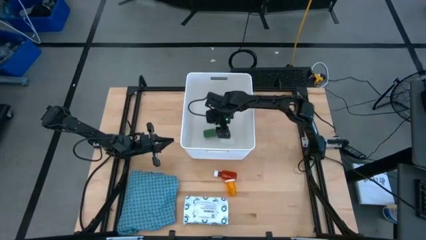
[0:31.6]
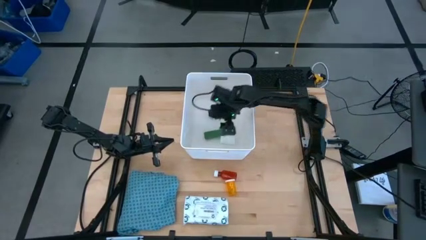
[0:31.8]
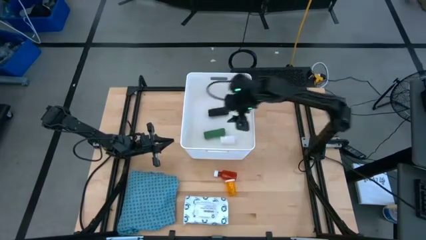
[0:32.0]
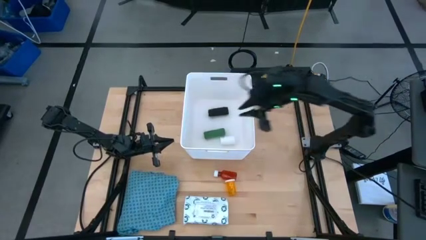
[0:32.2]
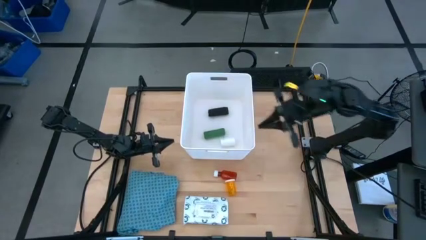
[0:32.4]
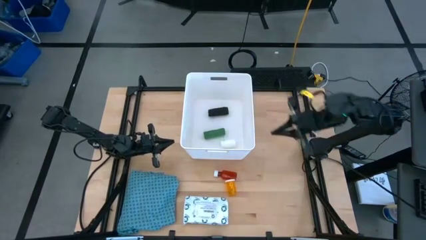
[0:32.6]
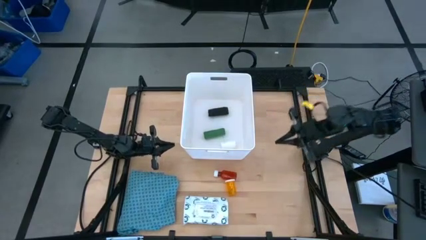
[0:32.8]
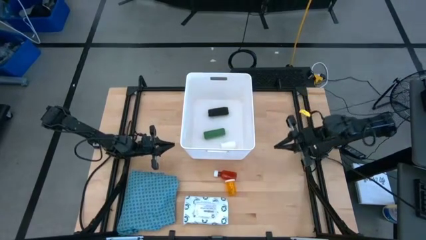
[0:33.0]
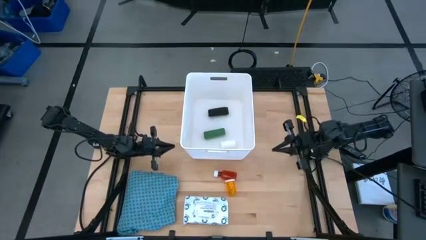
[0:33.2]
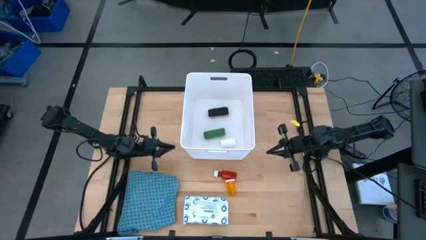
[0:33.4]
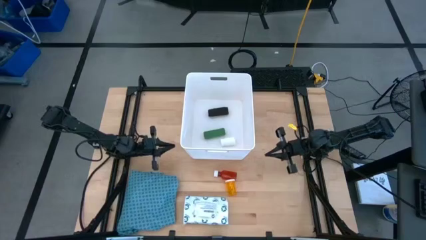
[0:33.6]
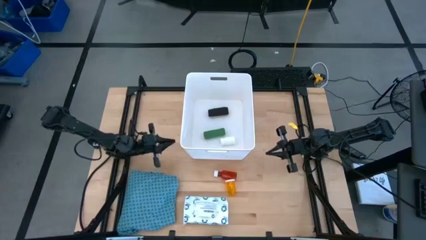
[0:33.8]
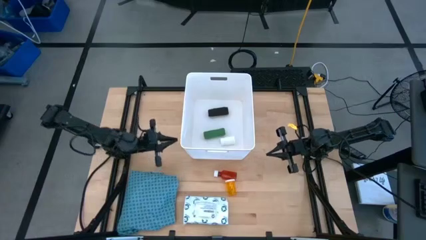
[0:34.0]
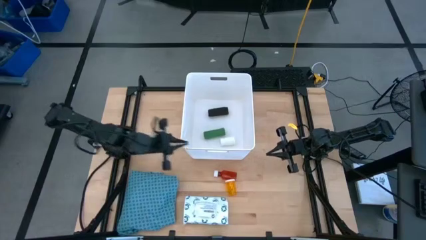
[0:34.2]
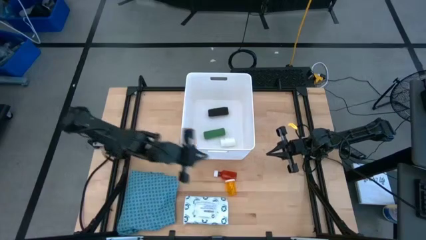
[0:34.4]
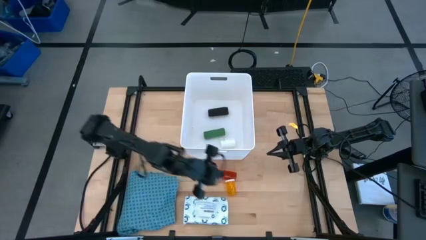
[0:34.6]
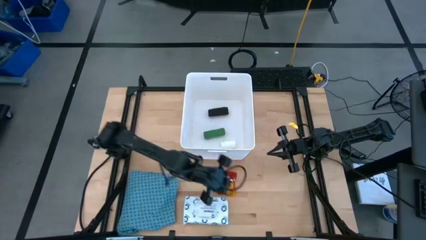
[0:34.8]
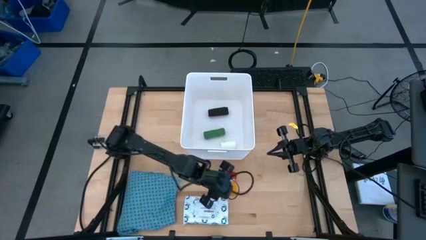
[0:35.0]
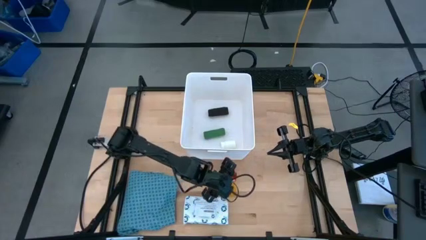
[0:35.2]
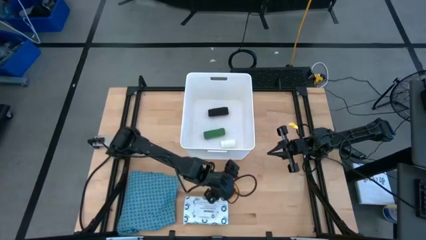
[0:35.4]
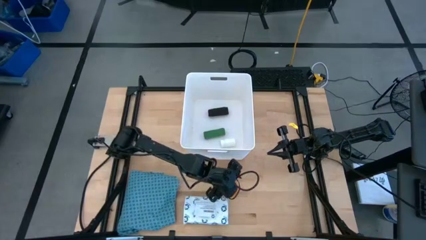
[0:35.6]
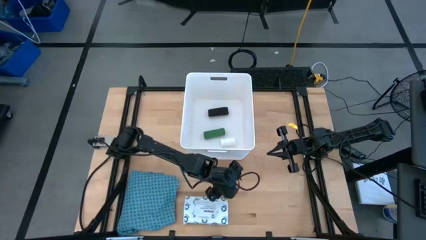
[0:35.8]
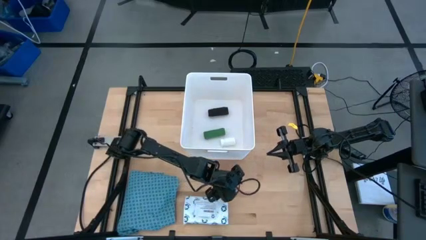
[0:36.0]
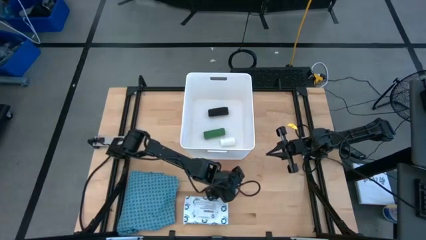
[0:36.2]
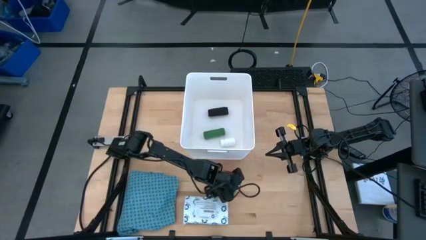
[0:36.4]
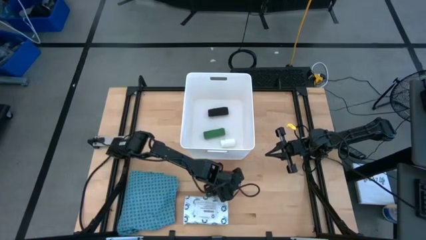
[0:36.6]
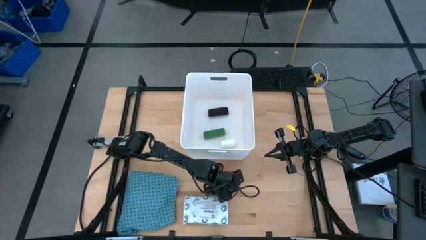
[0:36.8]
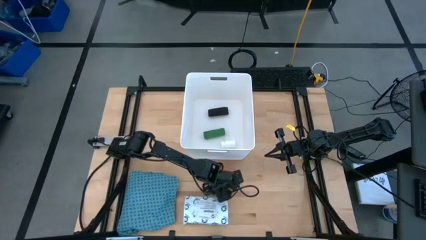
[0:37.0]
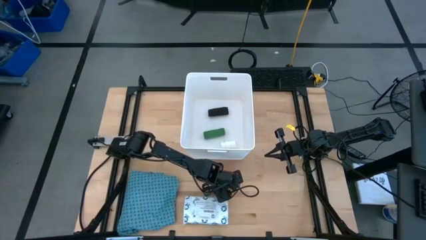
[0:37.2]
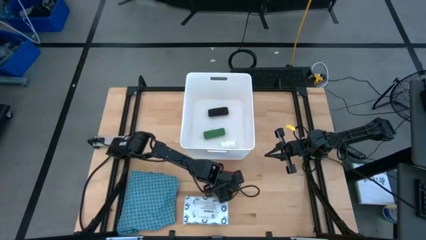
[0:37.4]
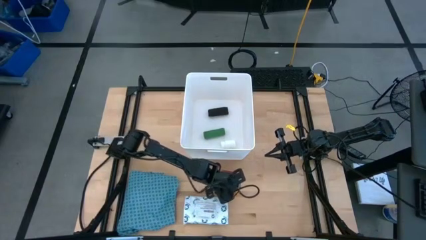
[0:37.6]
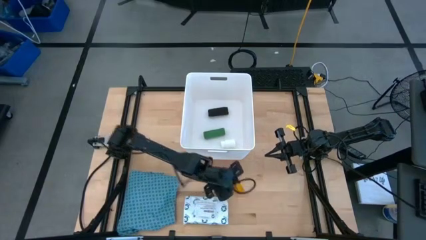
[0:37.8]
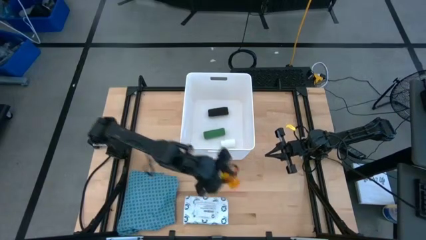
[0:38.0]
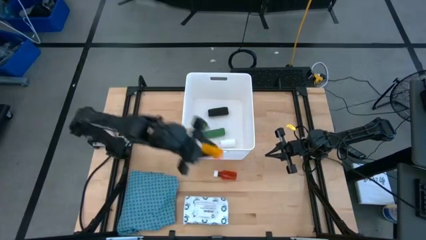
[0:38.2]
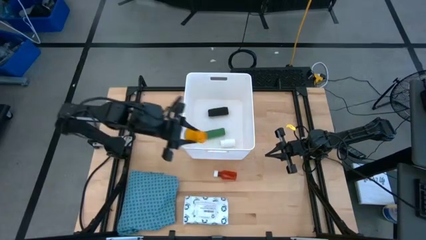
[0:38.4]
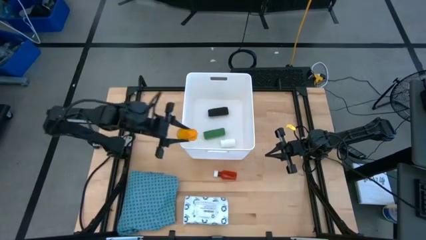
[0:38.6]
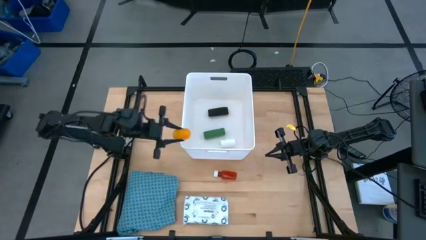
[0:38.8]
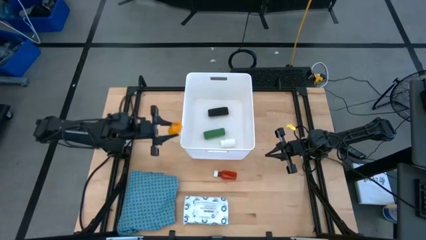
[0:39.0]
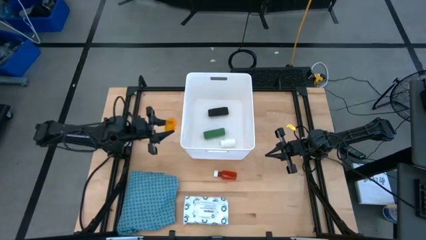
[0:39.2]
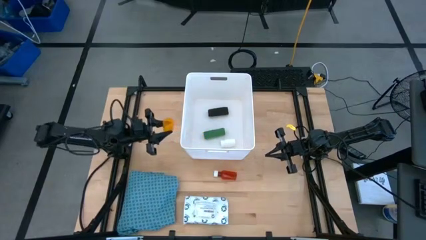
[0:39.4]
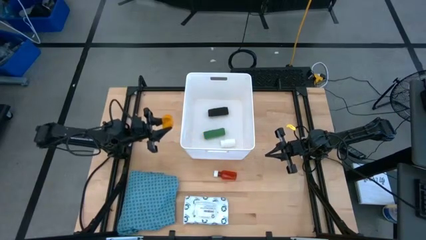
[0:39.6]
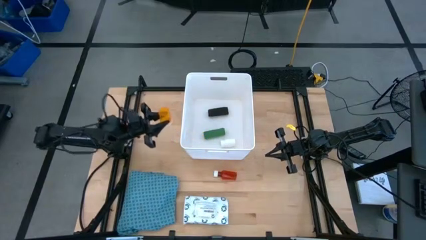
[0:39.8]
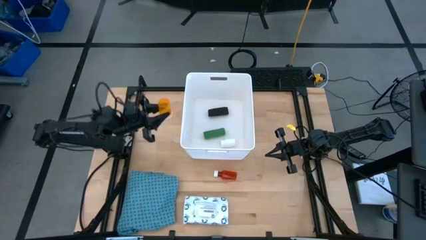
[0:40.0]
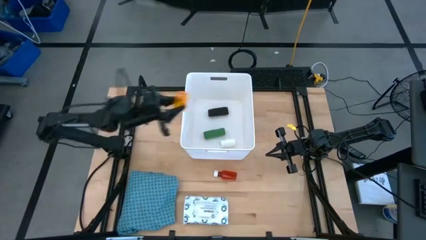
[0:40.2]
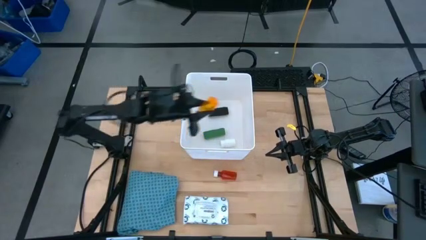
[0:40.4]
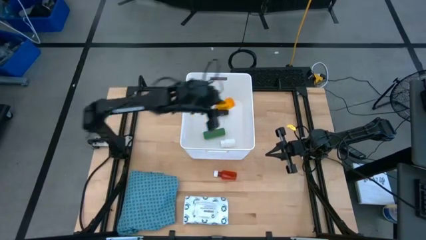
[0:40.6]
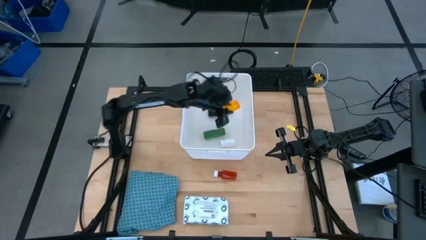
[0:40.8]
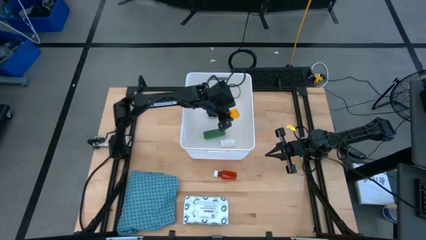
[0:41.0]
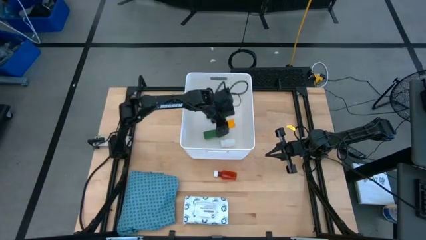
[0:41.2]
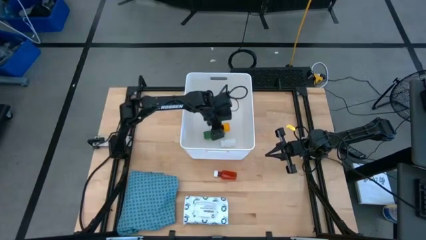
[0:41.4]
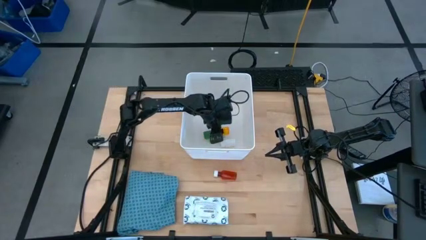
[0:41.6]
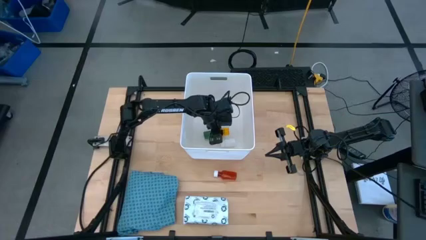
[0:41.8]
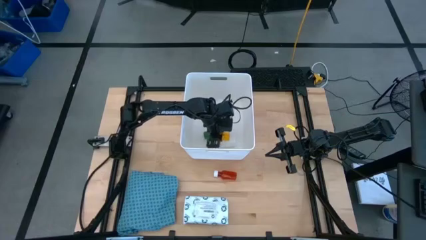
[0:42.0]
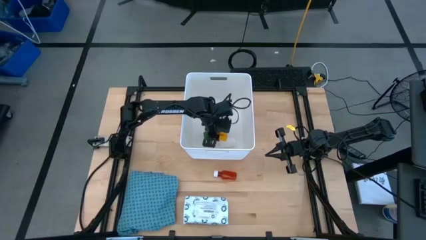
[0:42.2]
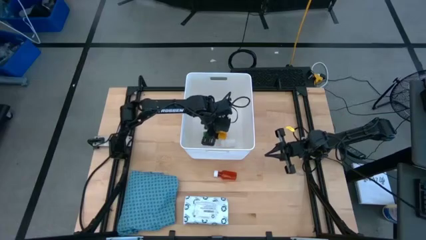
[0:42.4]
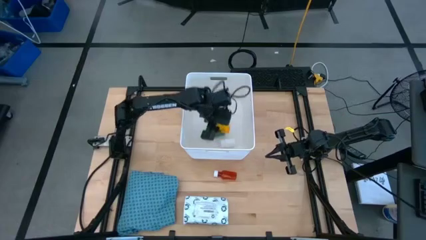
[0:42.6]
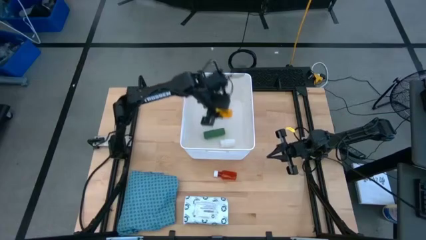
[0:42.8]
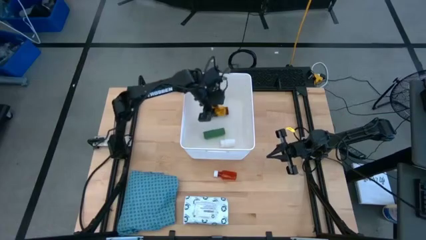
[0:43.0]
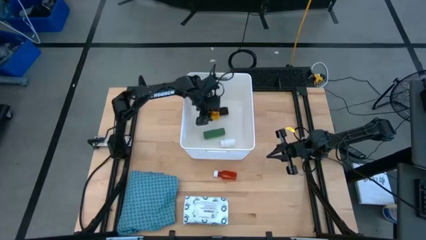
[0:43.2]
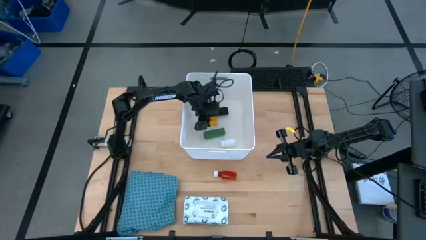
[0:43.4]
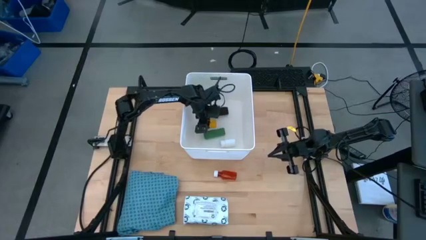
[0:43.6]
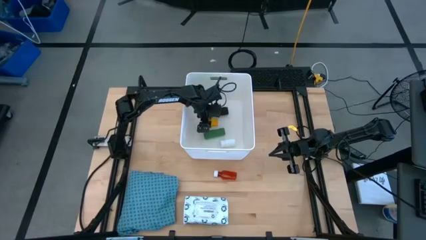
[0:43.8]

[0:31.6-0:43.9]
Task: Pick & place medical supplies in basket/bin
Put the orange medicine bottle into the bin

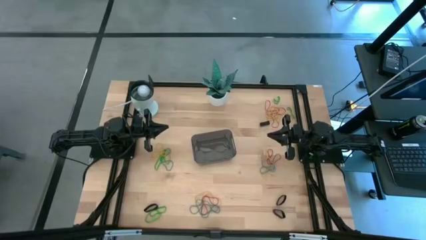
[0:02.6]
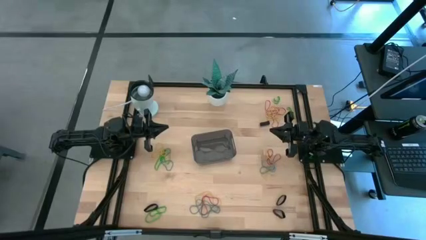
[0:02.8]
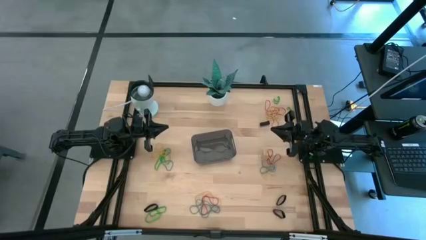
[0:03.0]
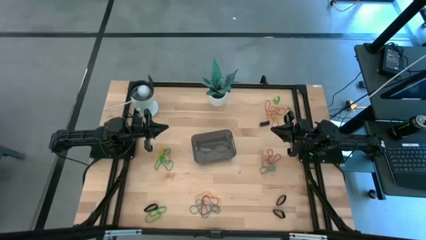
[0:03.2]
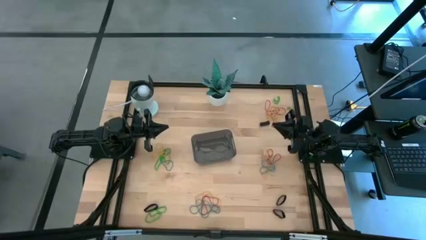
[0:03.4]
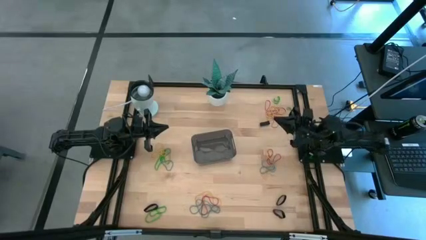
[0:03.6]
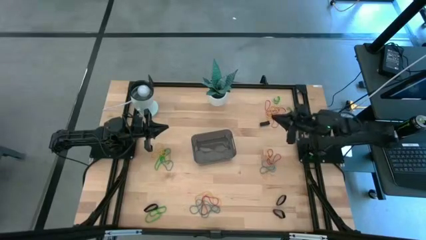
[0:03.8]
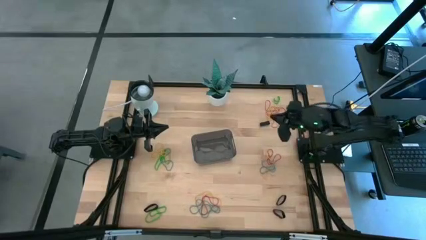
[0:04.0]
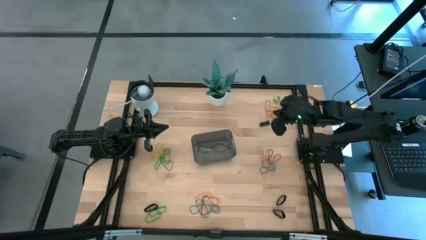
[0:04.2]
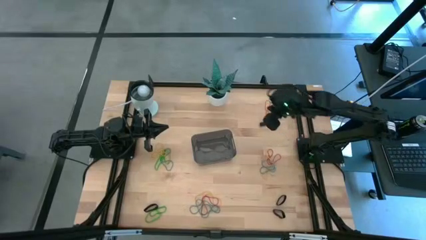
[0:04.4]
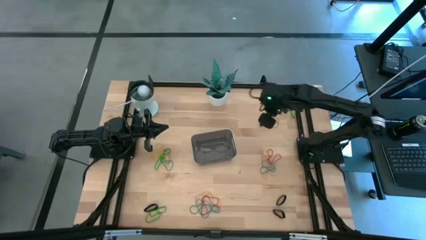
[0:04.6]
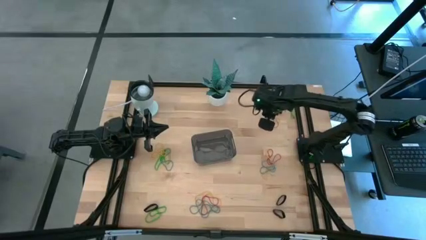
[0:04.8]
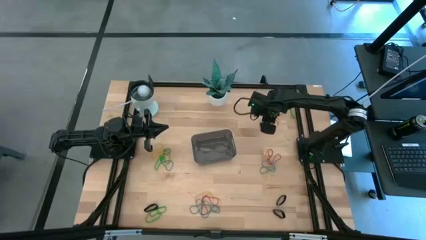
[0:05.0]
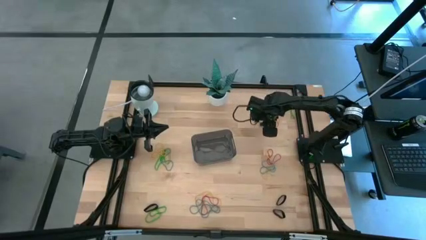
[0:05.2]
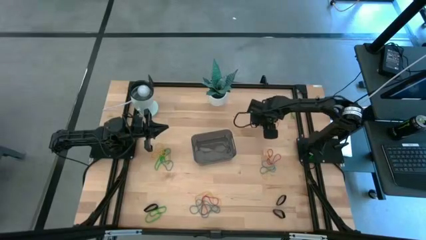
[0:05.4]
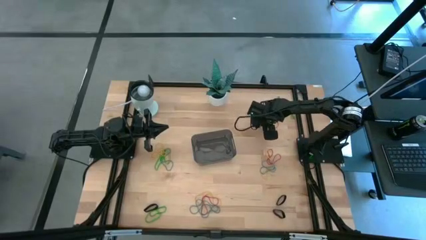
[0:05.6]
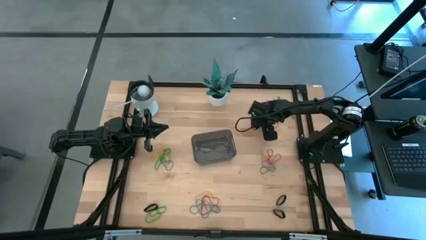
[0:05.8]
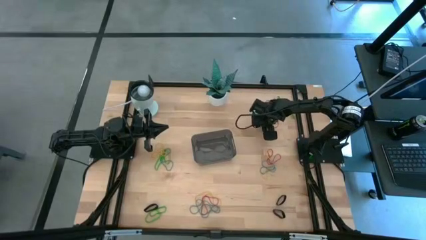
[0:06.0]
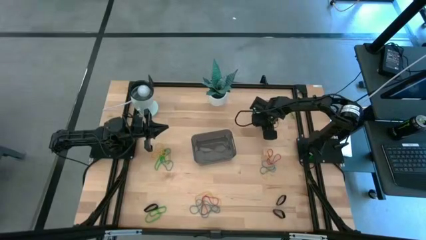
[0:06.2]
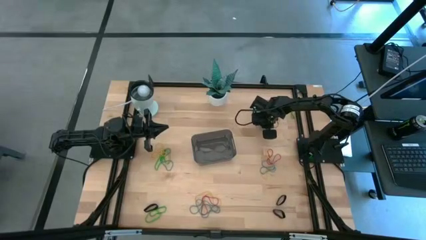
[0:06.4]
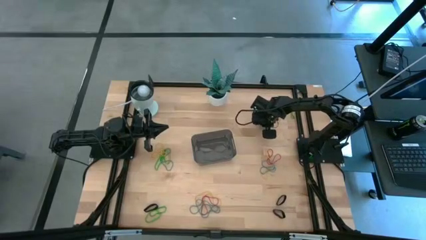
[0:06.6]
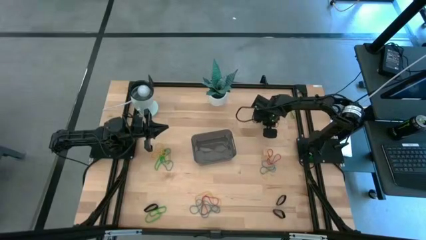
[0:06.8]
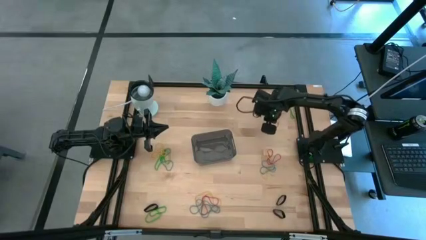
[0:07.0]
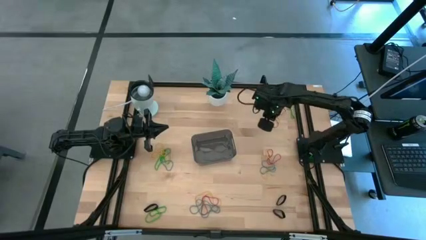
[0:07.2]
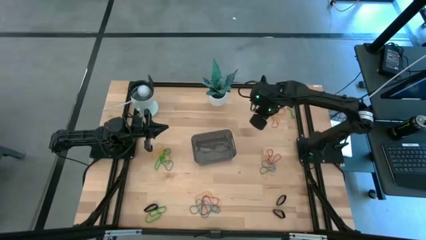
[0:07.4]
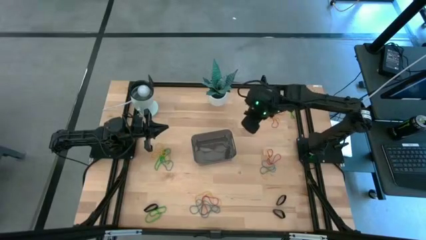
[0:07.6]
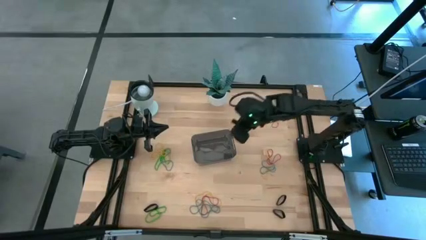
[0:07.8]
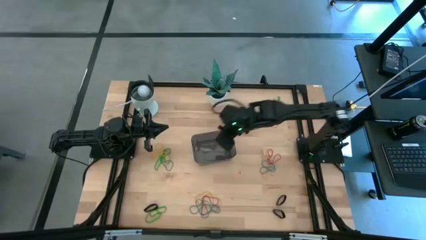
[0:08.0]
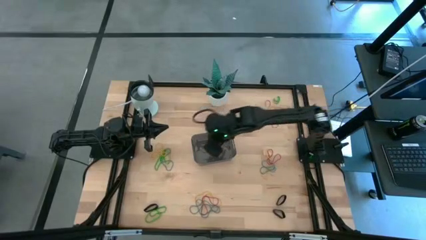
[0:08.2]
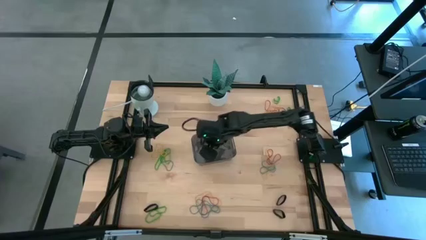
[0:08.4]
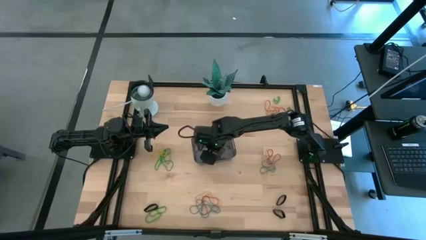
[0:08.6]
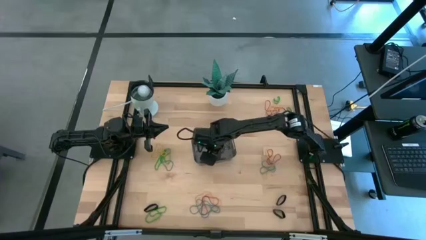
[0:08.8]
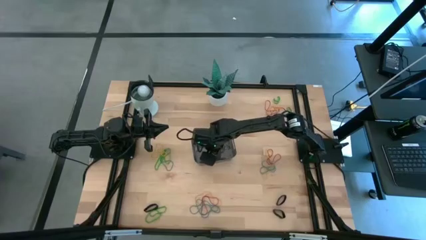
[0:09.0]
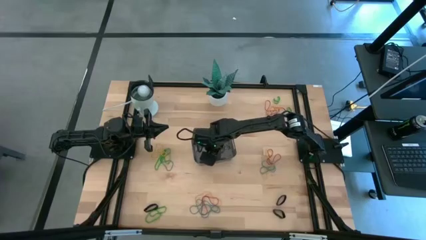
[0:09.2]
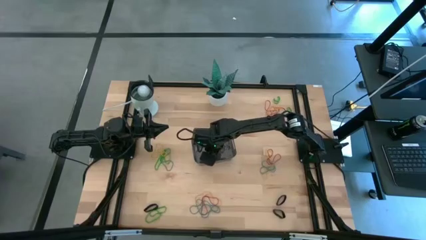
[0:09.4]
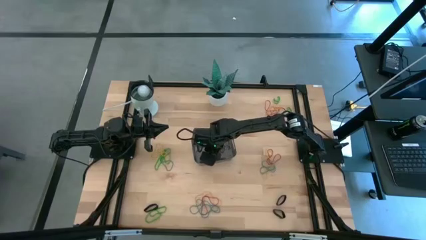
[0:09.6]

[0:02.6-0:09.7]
Task: Pick and place rubber bands into bin
Put the black rubber band into the black bin
